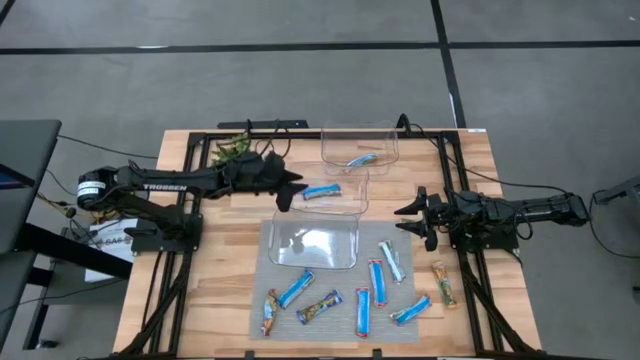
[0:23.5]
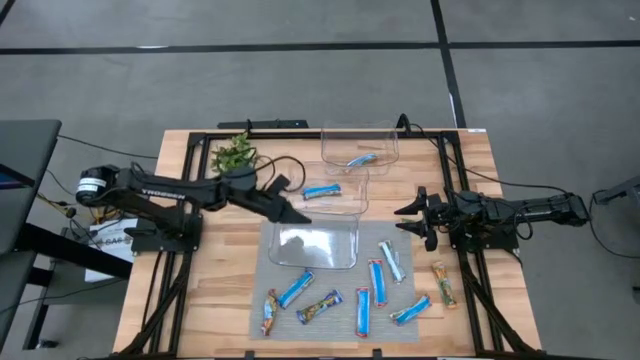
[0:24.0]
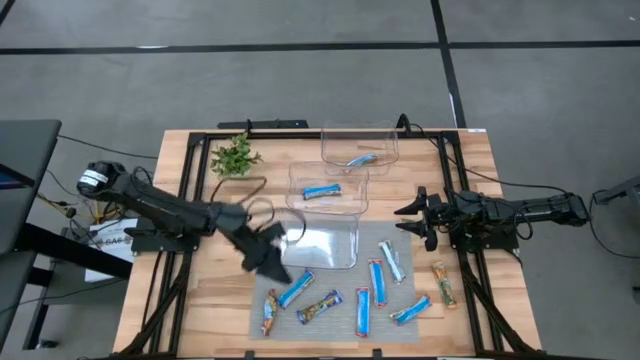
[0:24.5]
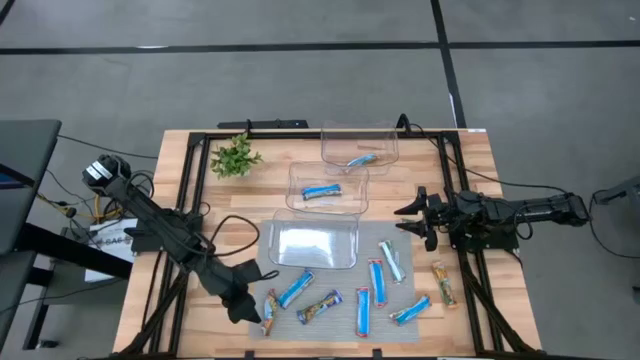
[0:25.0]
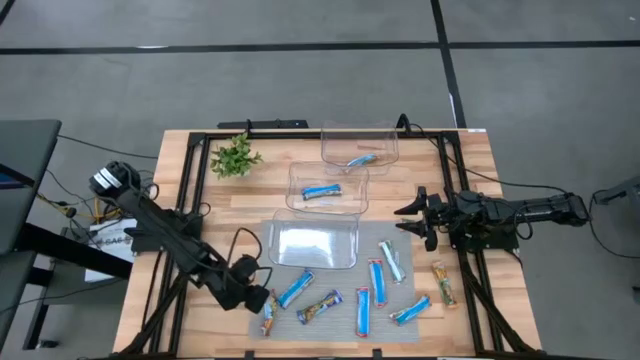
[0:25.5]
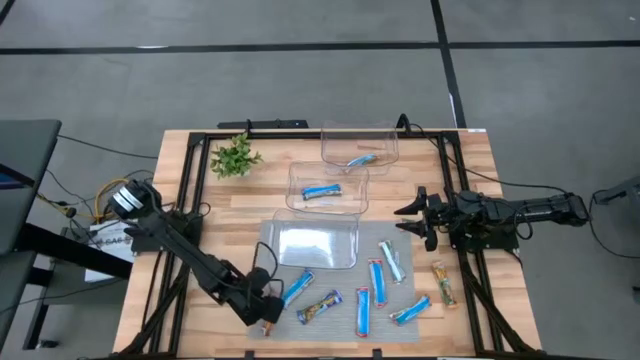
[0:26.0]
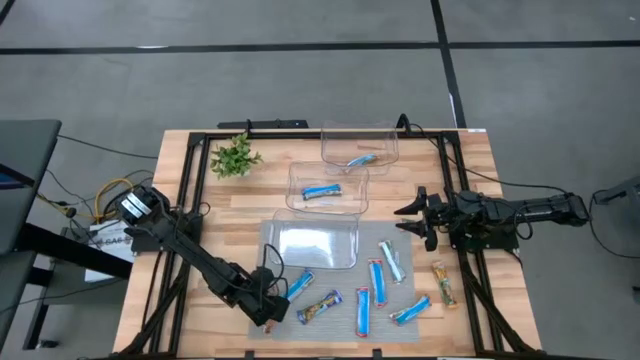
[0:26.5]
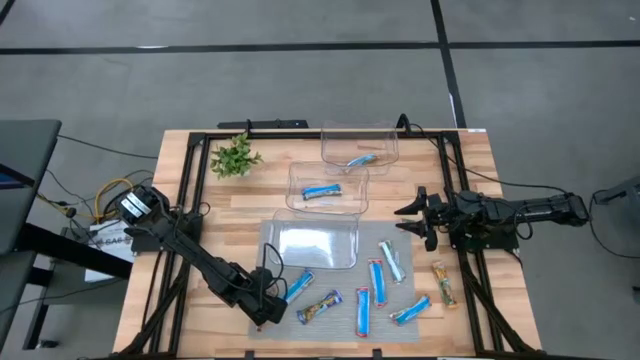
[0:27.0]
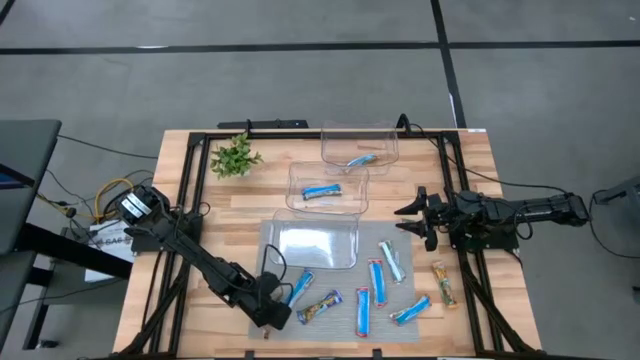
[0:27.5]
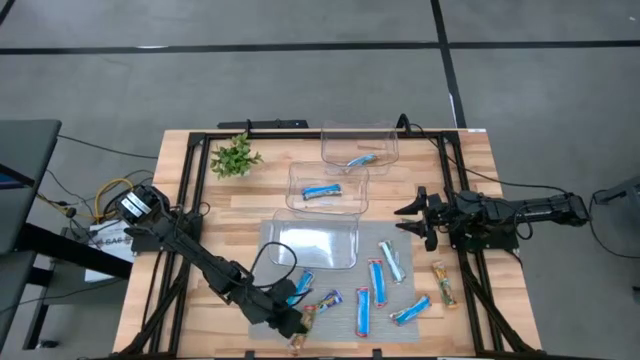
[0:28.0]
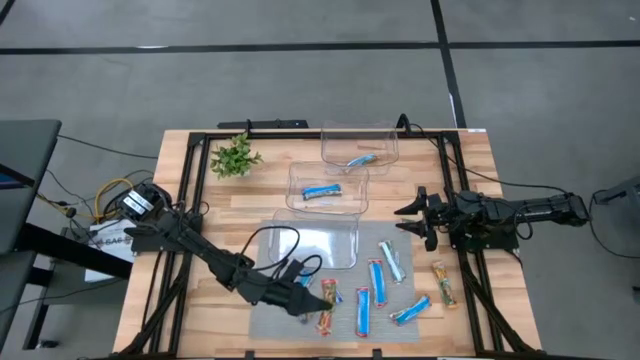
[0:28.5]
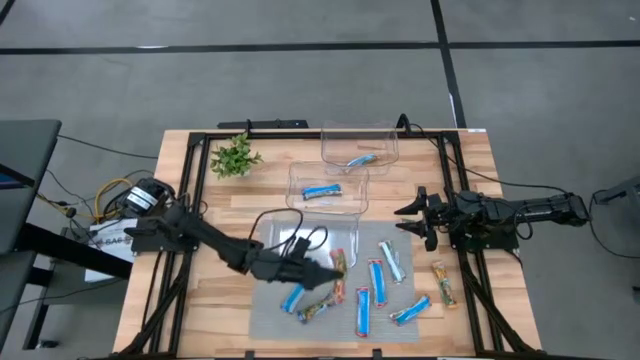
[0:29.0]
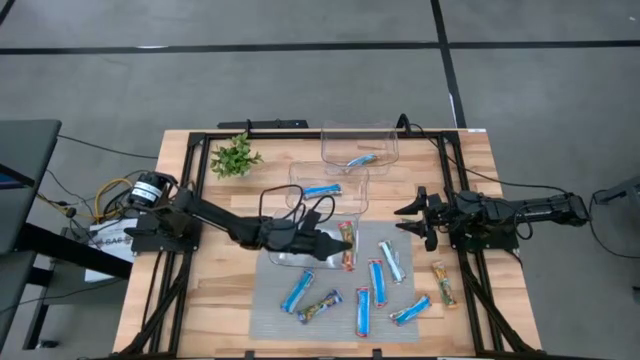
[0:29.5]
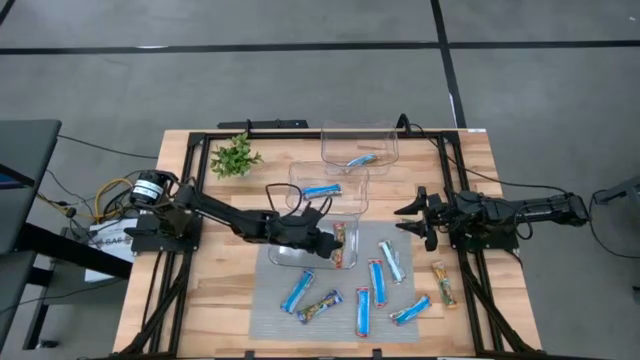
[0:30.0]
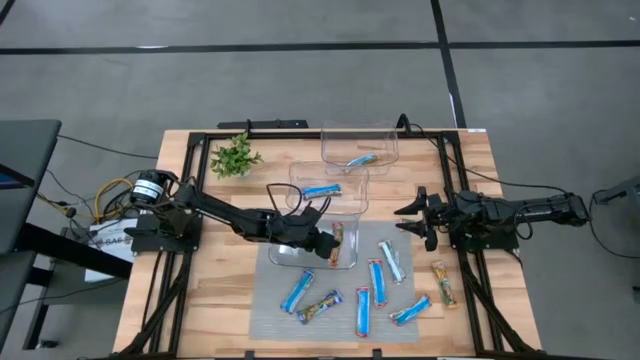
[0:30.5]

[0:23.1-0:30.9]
Task: Pick and place Granola Bars by type
Put the red granola bar into the bottom transparent bin

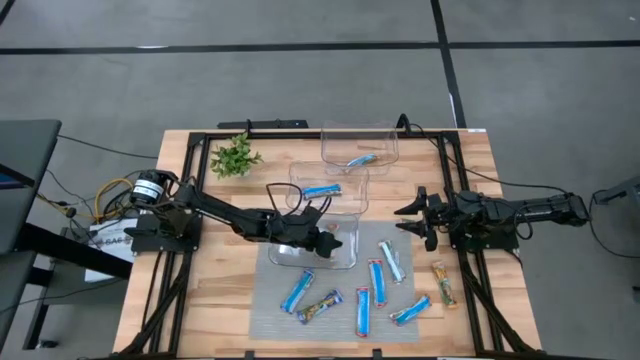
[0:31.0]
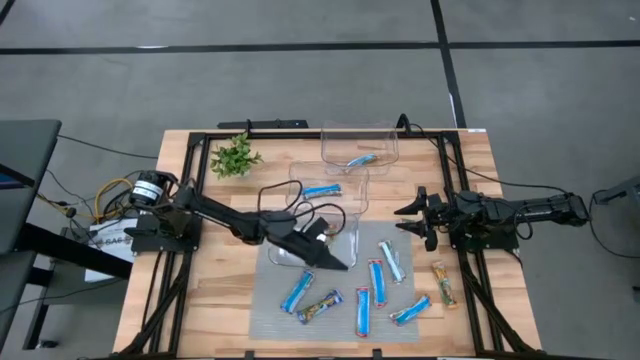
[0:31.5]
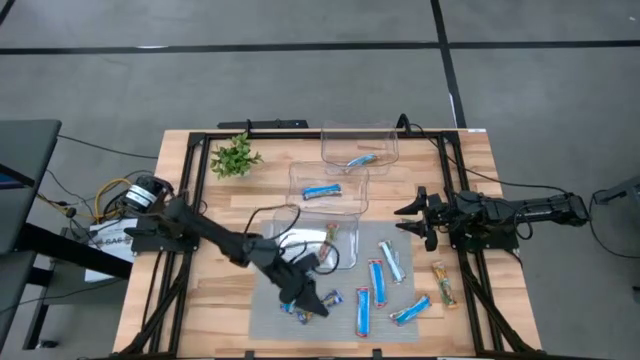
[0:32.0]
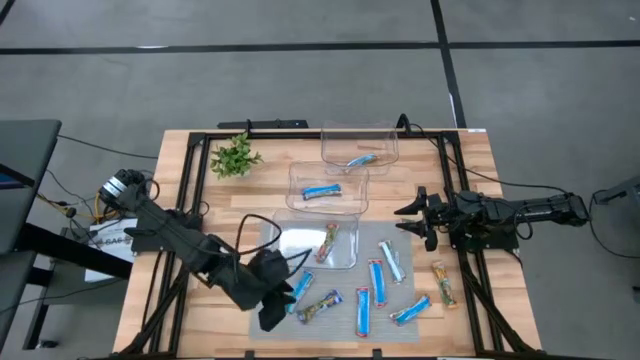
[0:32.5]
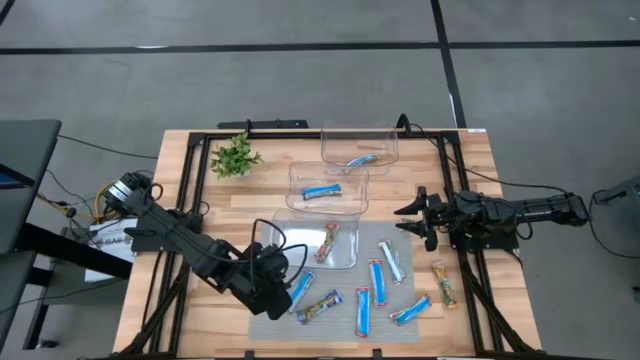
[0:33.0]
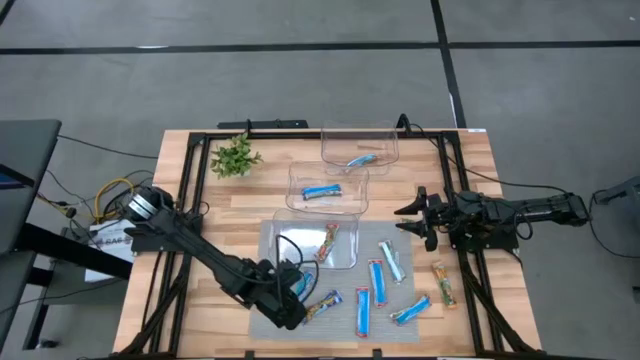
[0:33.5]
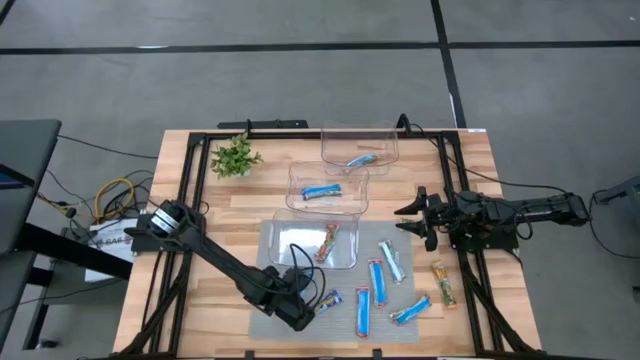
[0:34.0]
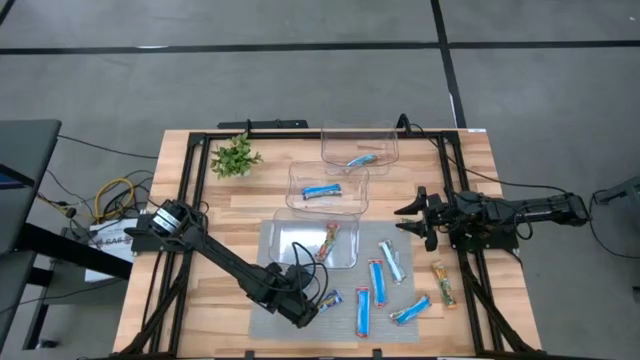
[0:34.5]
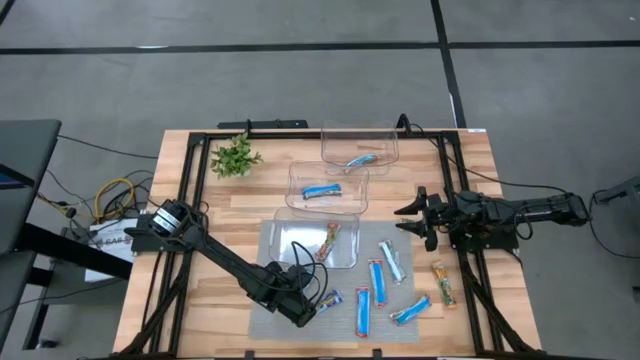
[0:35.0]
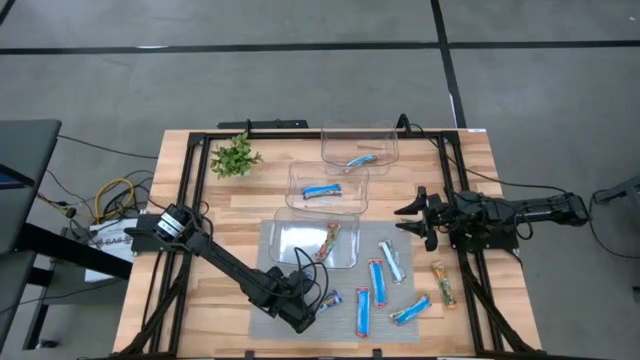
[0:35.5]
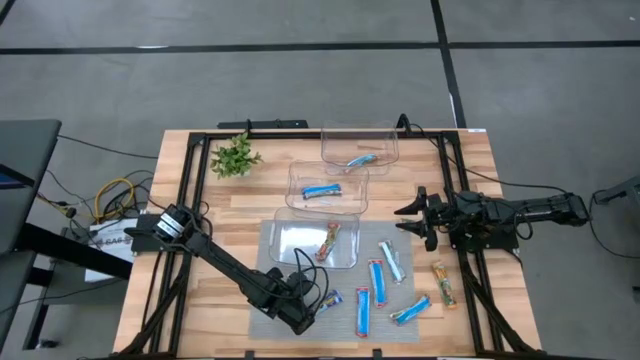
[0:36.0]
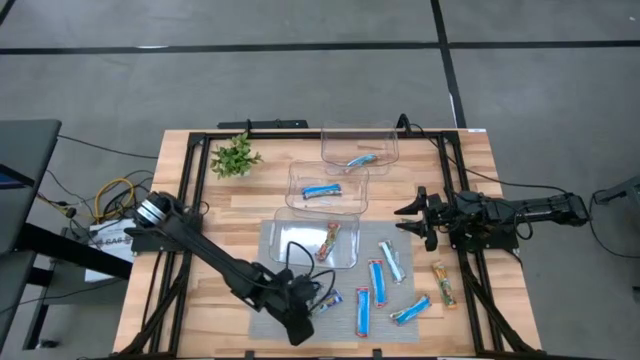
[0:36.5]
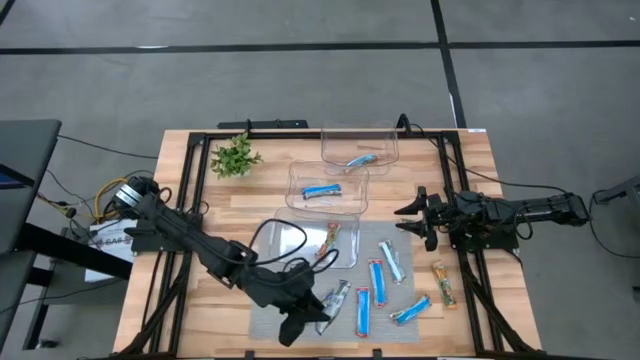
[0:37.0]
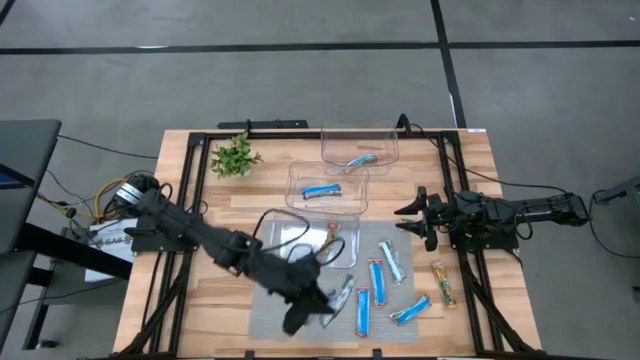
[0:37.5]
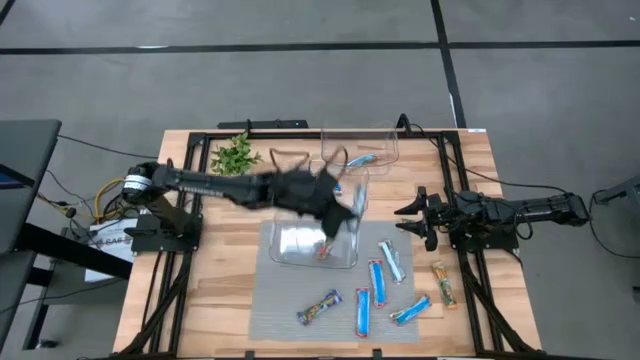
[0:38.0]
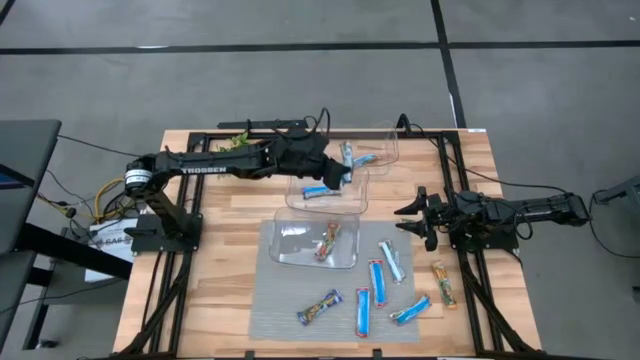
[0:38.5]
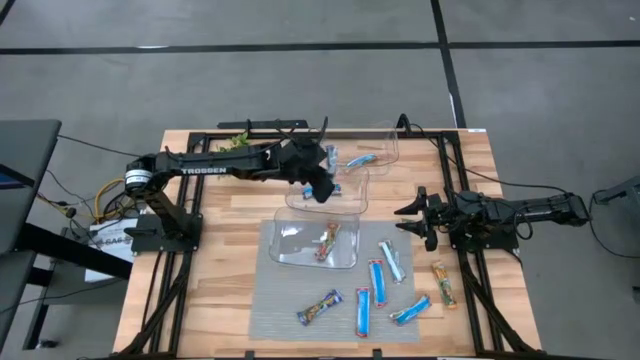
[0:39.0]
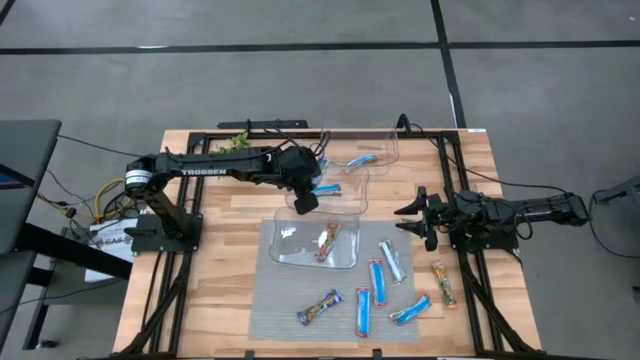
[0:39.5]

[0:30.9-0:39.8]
Put the top blue granola bar into the middle transparent bin

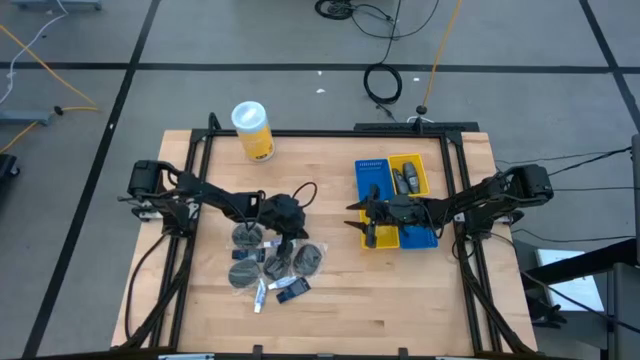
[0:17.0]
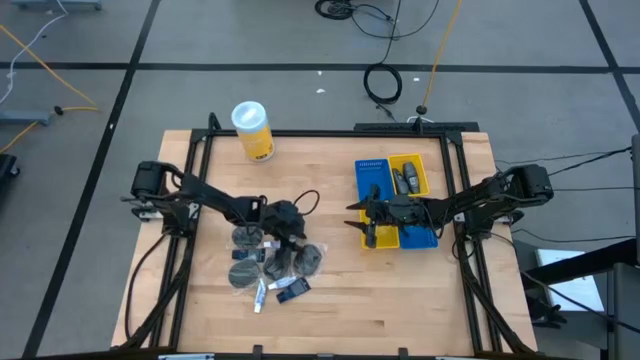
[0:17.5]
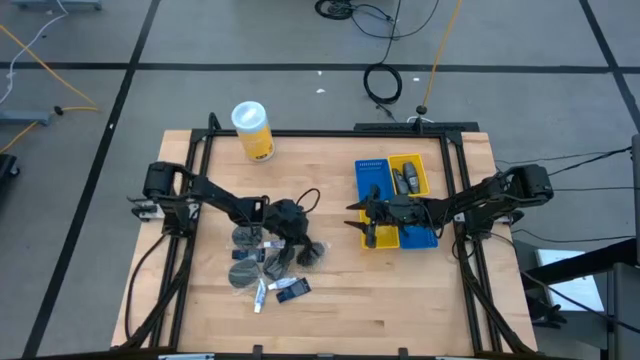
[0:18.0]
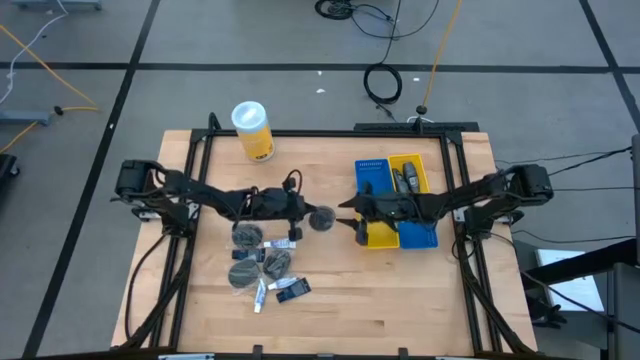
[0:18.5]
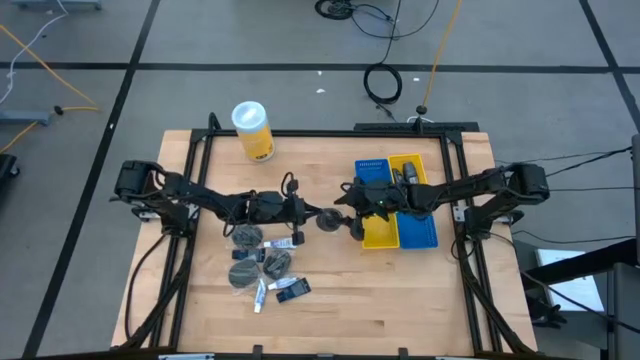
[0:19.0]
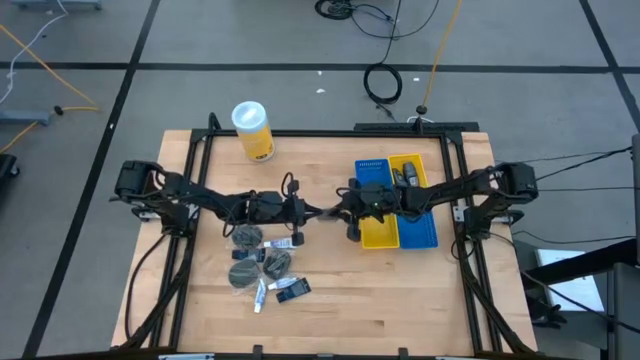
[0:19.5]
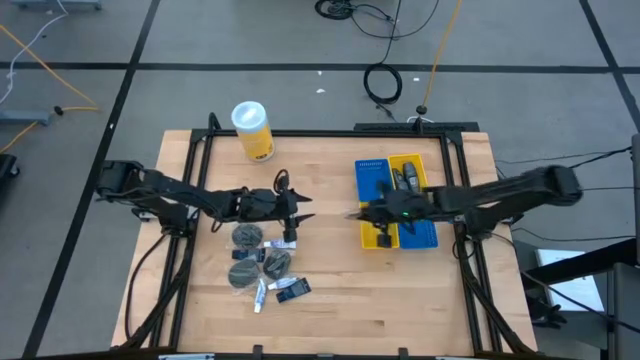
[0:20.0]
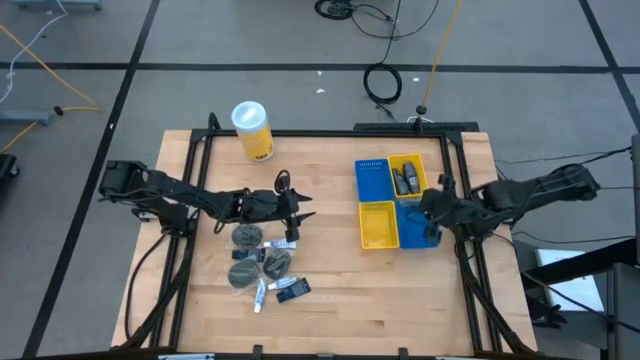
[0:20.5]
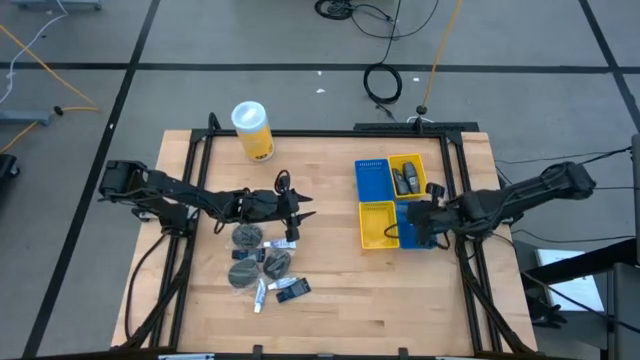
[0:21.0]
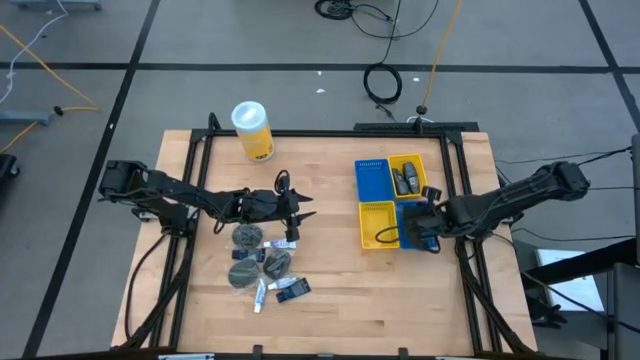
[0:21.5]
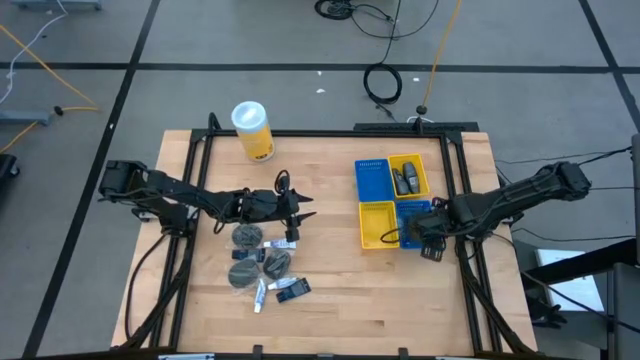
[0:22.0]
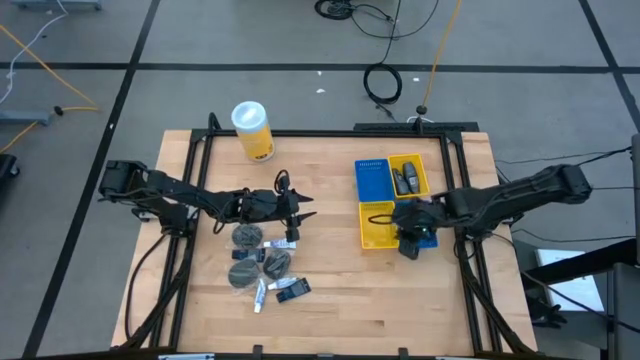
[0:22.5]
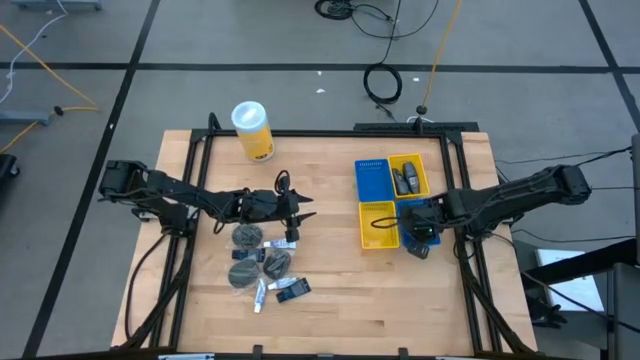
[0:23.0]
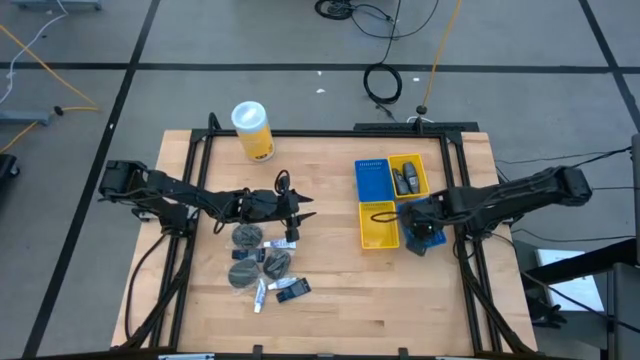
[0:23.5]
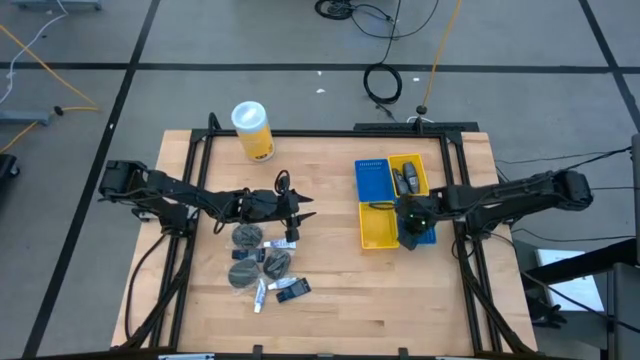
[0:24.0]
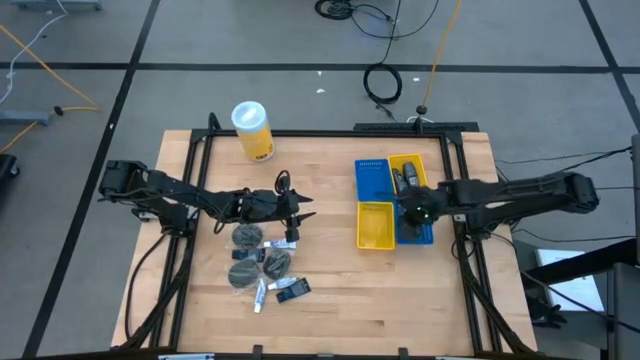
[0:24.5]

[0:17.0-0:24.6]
Task: Pick & Place Travel size toiletries
Put the black hairbrush into the bottom blue bin
